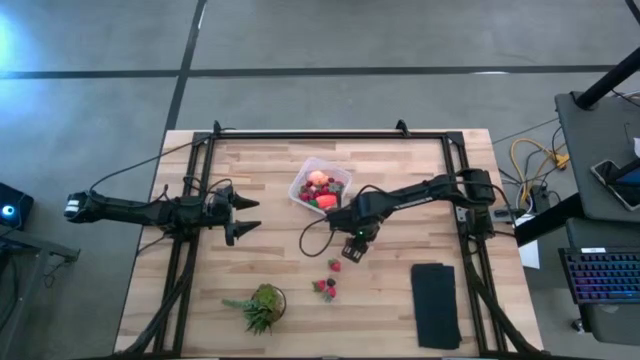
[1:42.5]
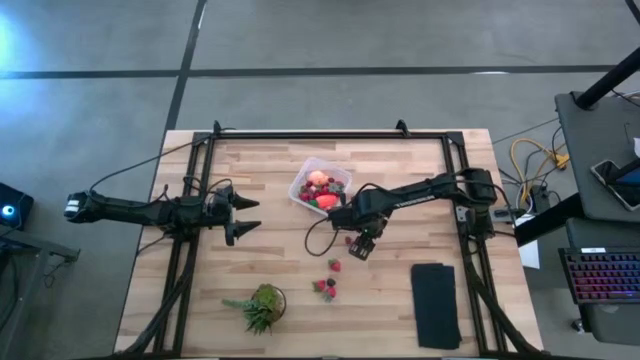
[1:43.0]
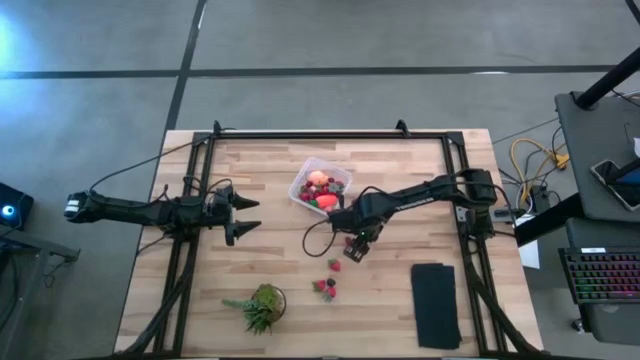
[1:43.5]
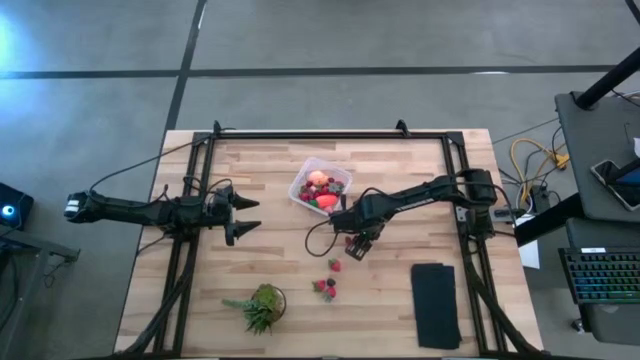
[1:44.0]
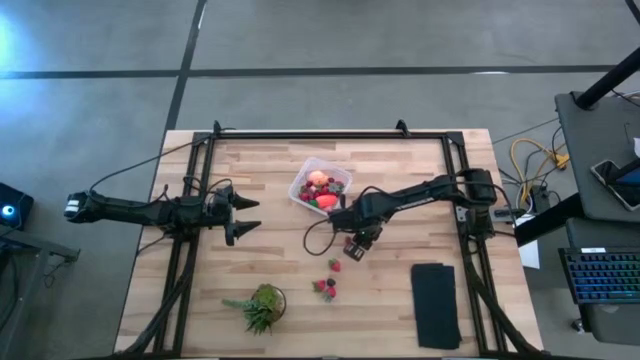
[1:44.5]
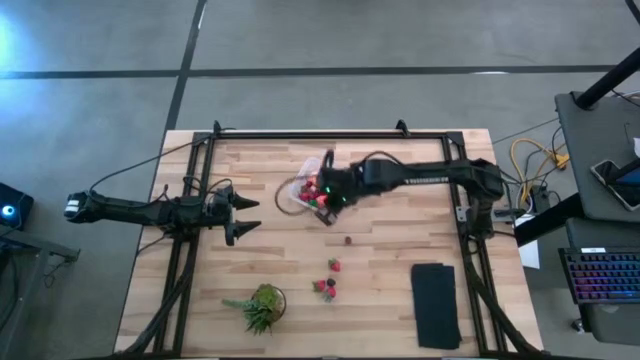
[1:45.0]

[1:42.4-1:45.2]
Task: Pick and placing Produce into tupperware
Put the pink peach into the transparent bin

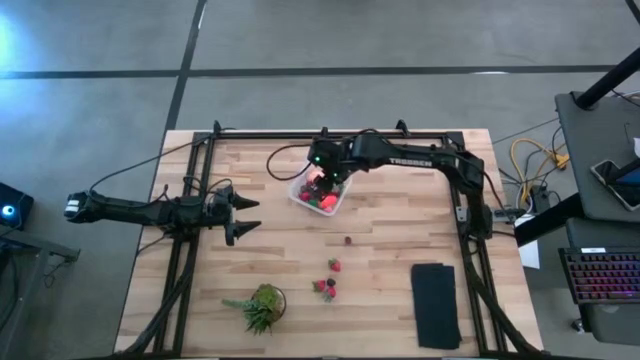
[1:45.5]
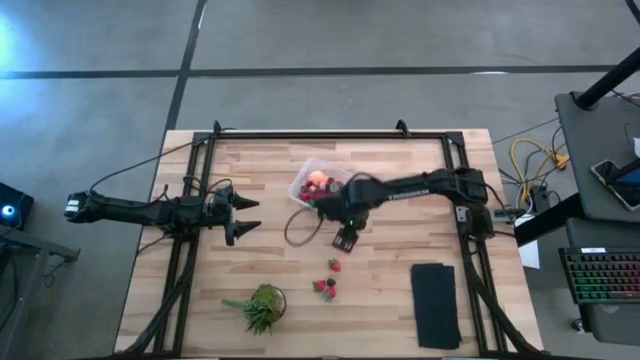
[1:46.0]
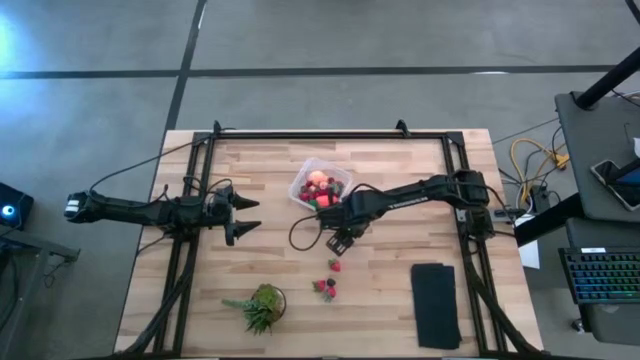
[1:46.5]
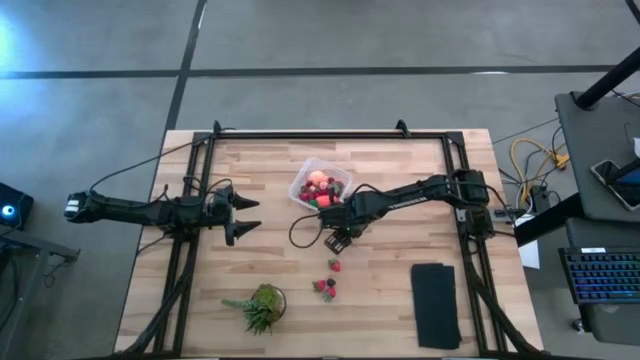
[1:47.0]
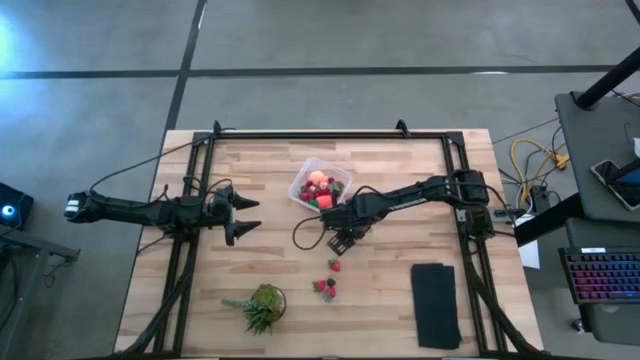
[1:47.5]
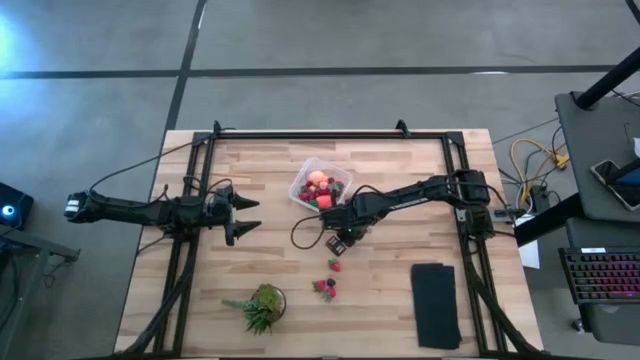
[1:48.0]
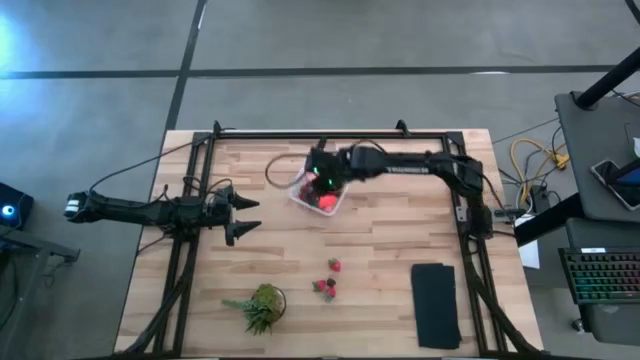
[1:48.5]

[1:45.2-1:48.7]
Put the red cherry into the transparent bin

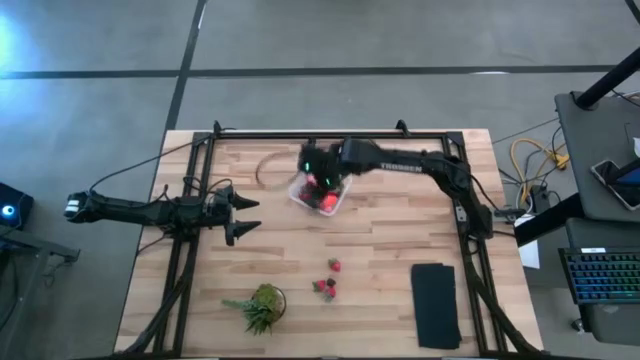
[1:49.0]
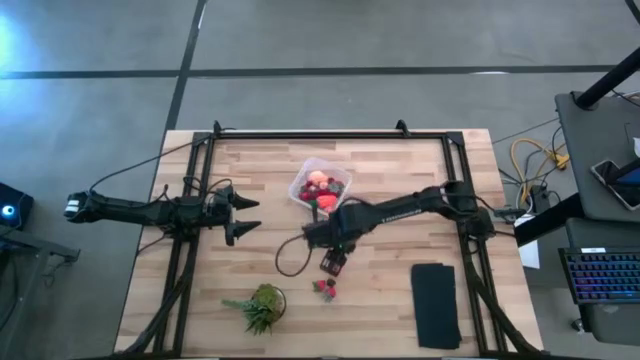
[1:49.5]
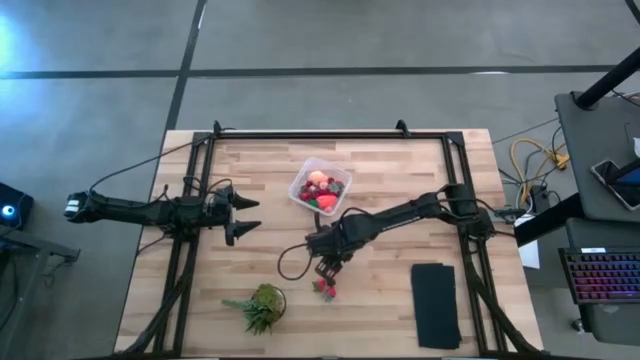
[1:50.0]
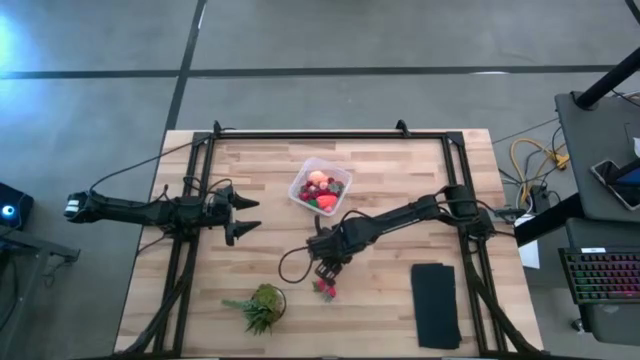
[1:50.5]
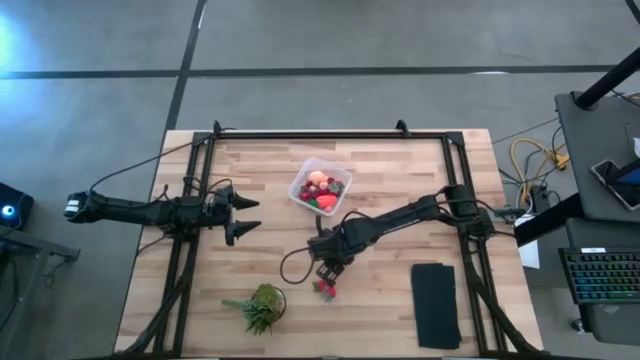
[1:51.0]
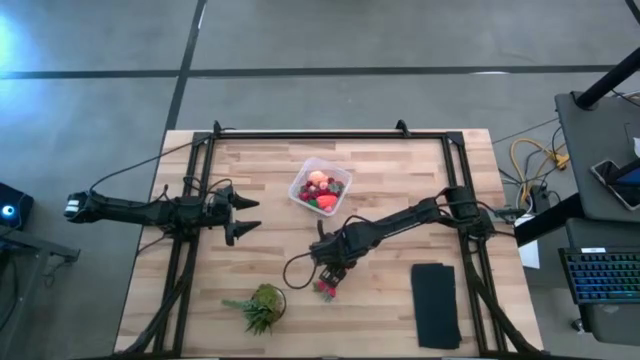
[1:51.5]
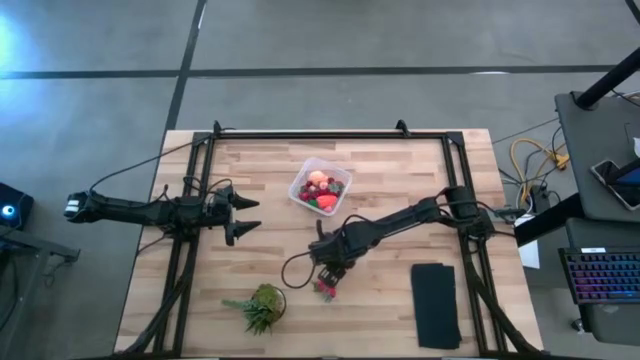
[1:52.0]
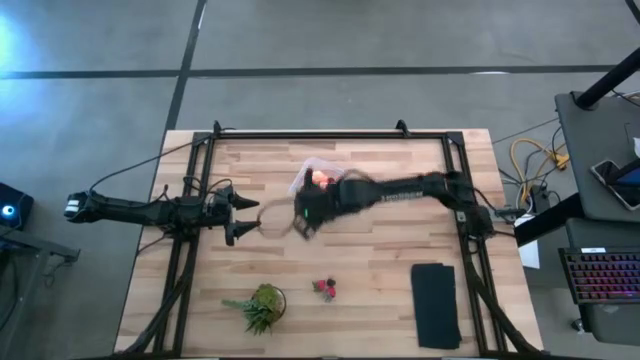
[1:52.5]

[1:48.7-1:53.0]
Put the red strawberry into the transparent bin

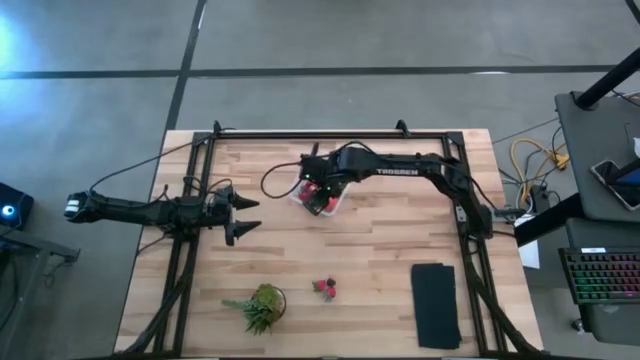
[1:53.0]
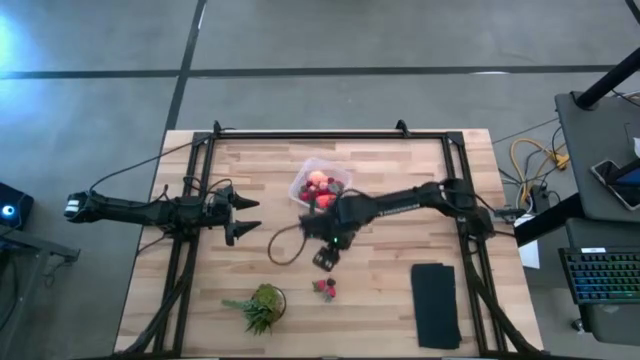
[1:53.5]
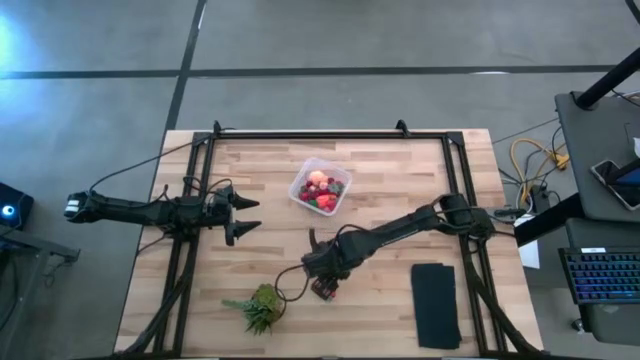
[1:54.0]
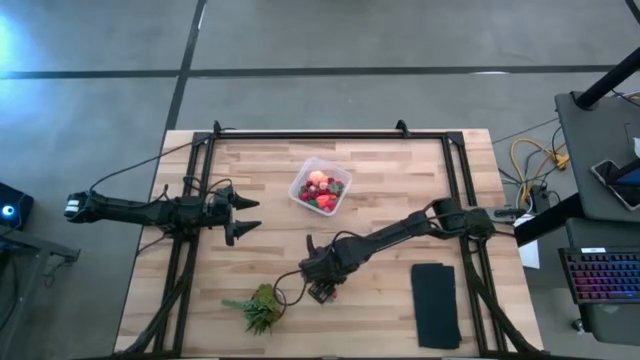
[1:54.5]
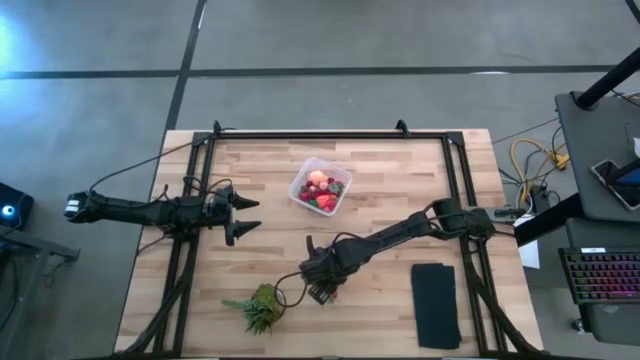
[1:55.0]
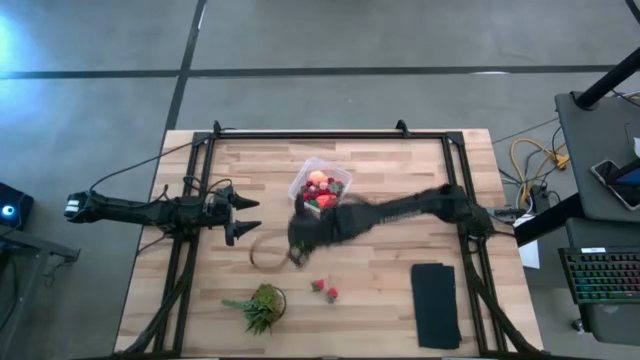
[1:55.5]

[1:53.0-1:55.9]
Put the black berry into the transparent bin

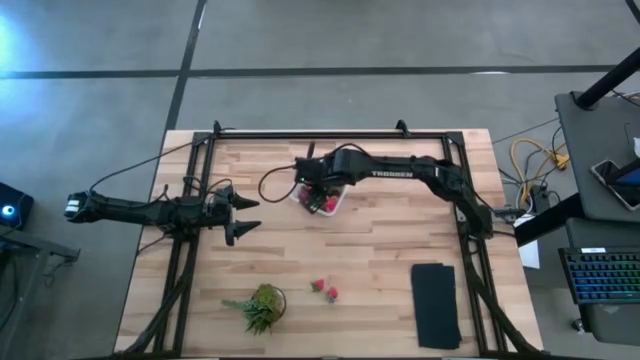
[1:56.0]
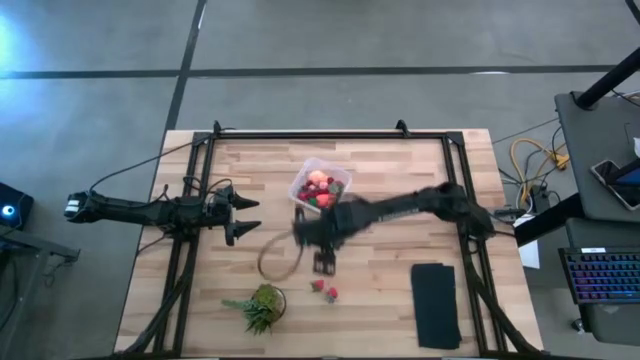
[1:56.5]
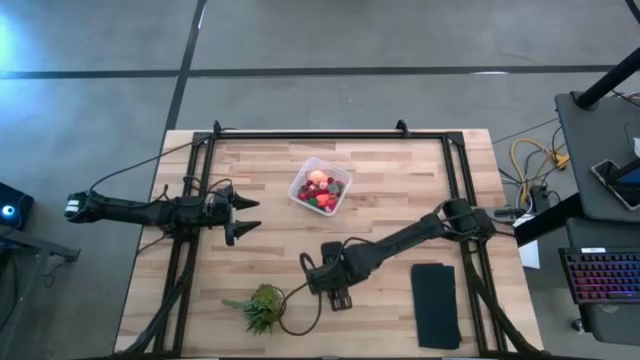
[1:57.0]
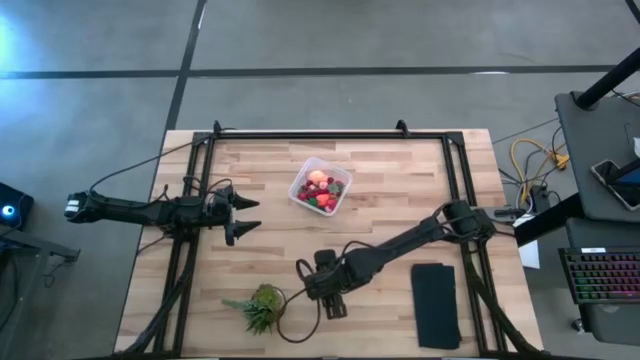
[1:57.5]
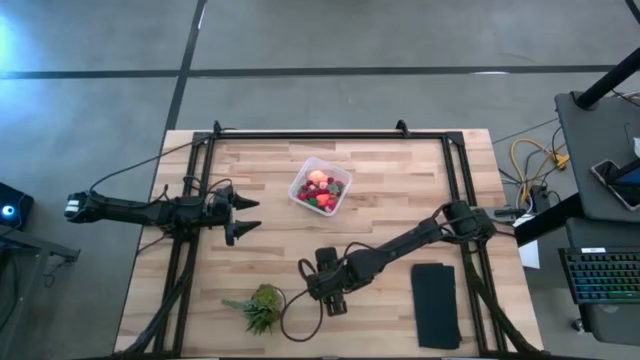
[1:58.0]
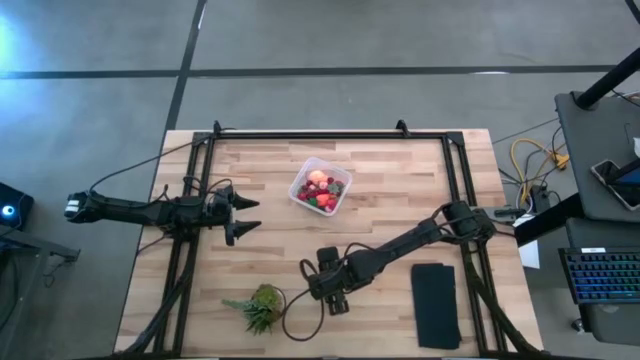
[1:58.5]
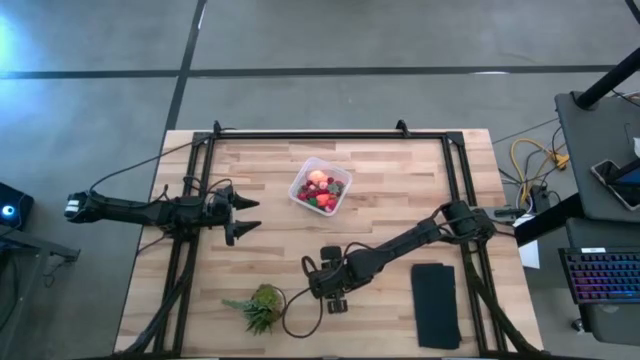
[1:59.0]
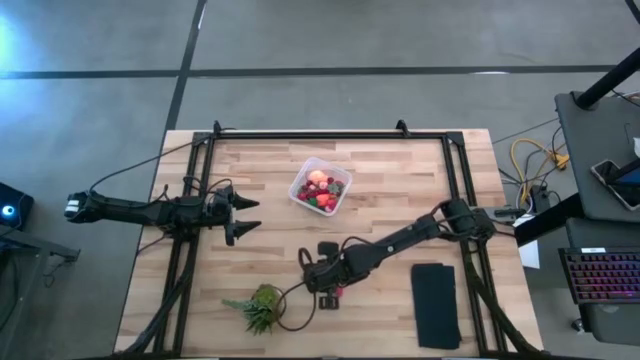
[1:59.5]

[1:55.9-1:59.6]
Put the red strawberry into the transparent bin

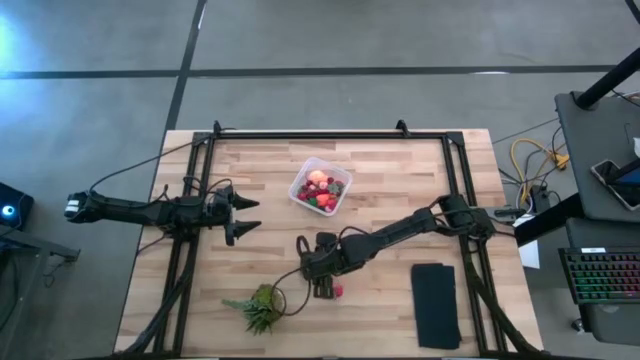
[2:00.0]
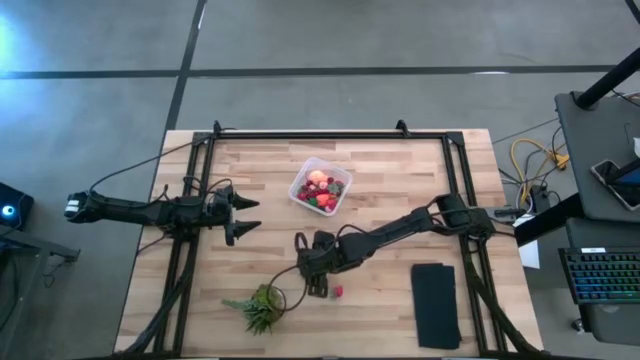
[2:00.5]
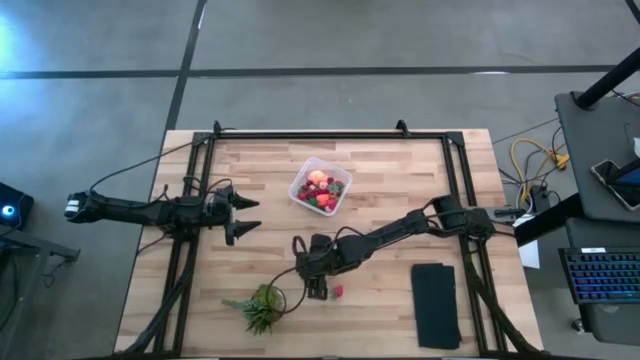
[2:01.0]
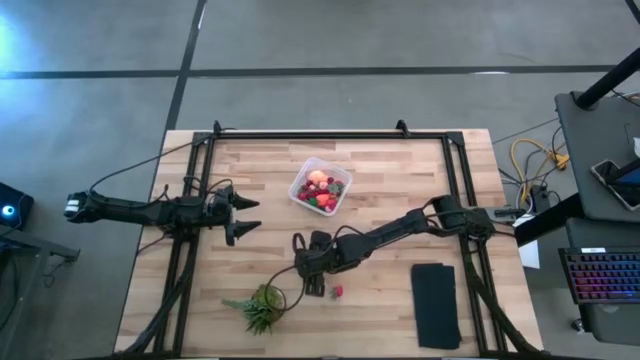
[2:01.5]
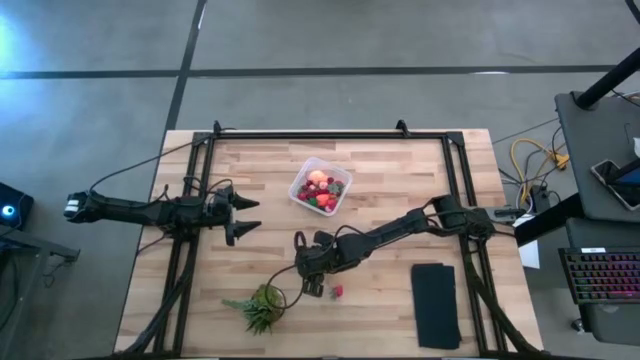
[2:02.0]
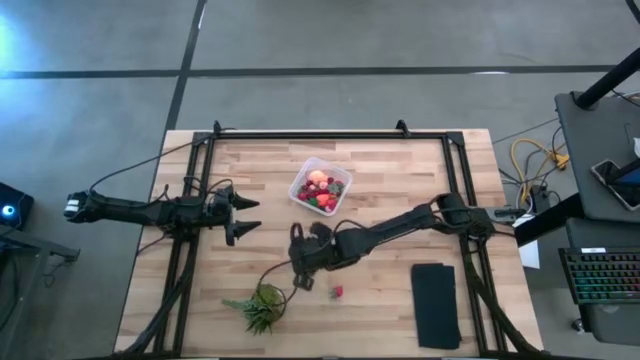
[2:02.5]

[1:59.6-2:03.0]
Put the red strawberry into the transparent bin

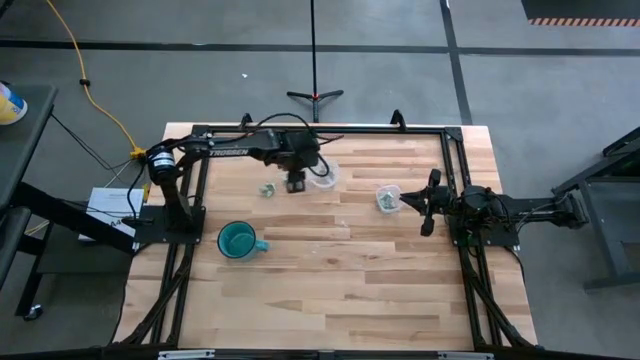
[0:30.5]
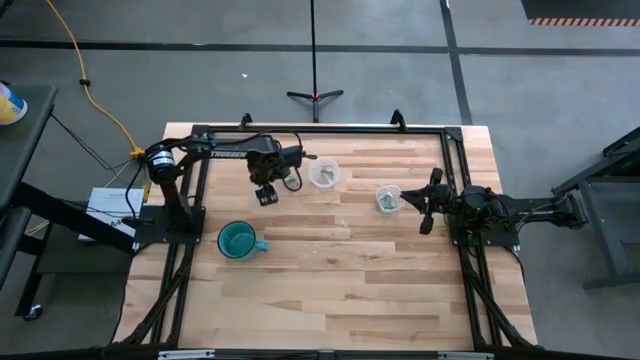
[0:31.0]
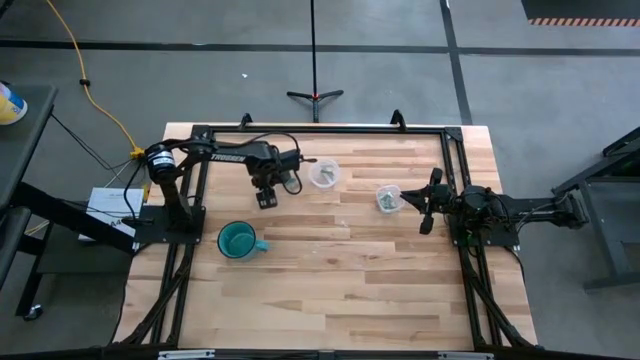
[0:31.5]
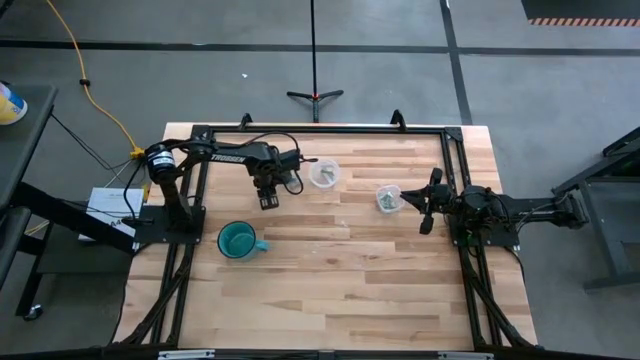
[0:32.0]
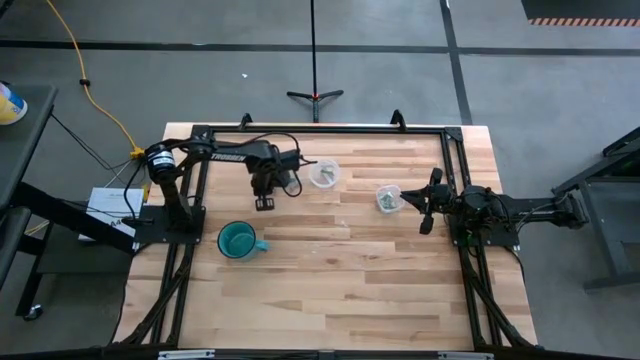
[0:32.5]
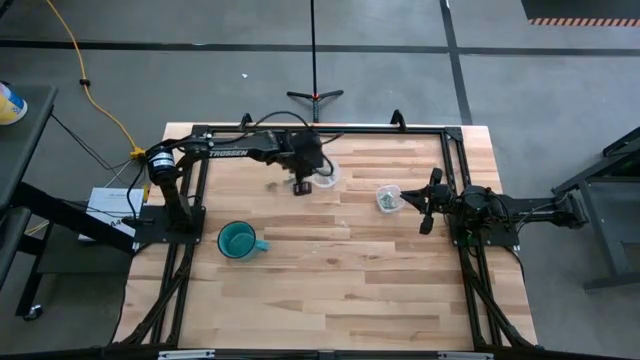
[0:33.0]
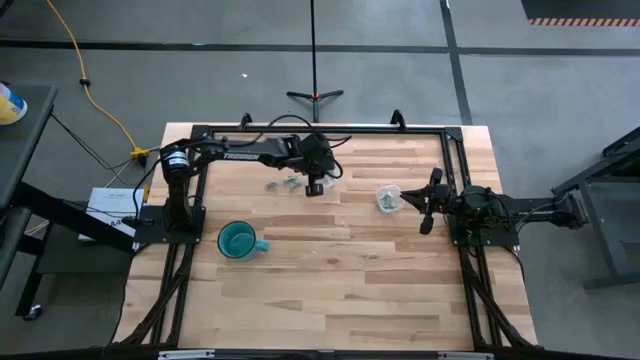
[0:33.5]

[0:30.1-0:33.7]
Task: Pick and place items into bin
Put the stevia packet into the top transparent bin
